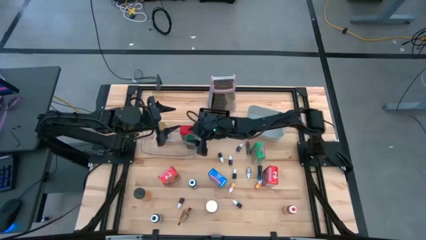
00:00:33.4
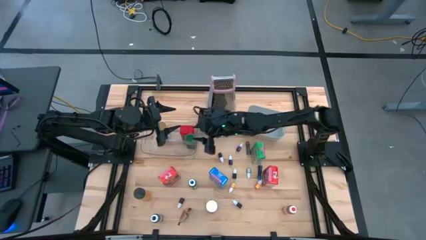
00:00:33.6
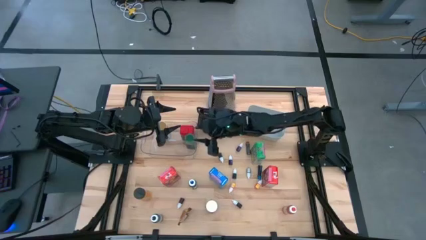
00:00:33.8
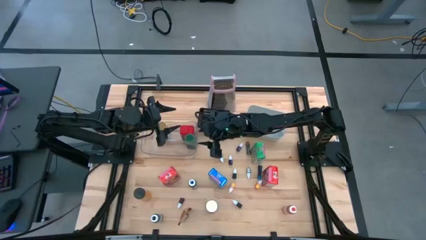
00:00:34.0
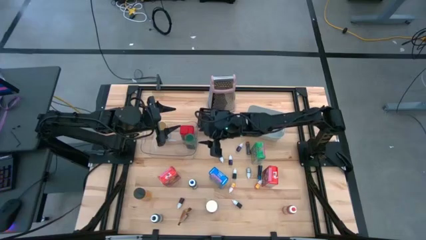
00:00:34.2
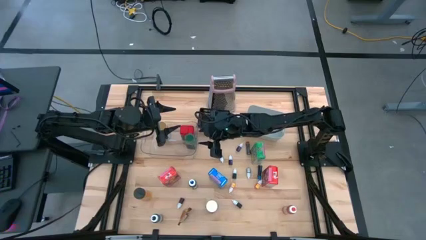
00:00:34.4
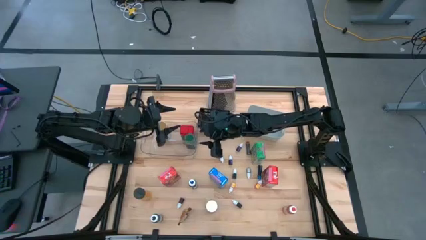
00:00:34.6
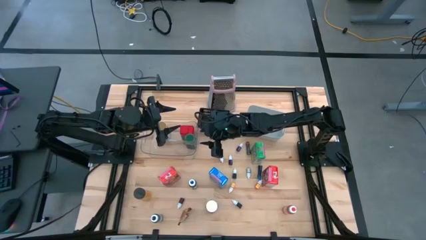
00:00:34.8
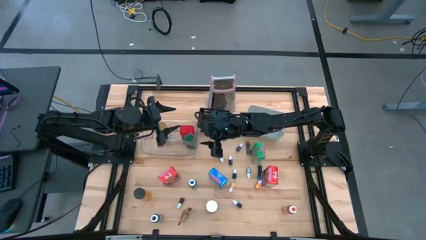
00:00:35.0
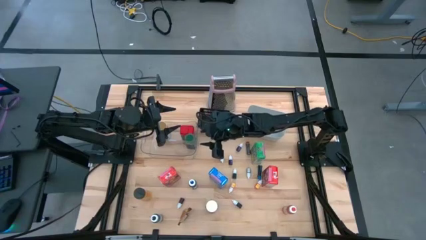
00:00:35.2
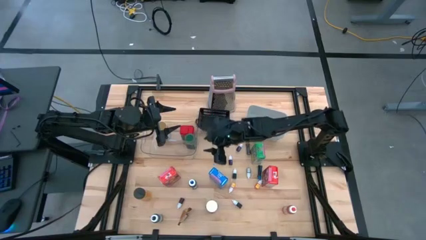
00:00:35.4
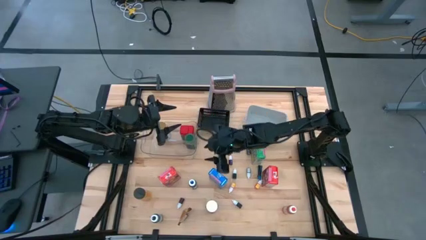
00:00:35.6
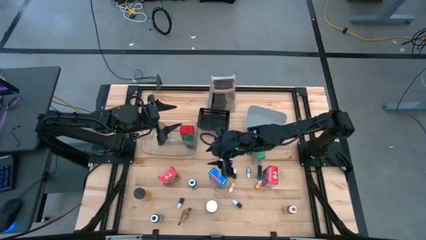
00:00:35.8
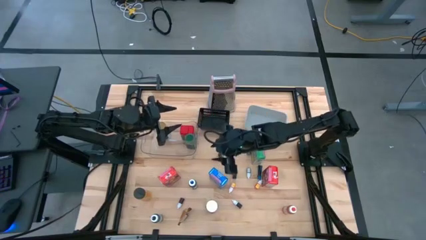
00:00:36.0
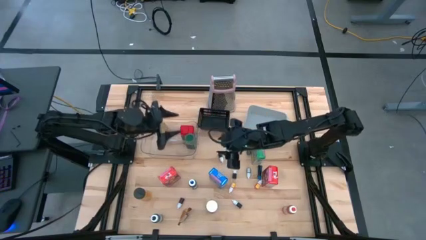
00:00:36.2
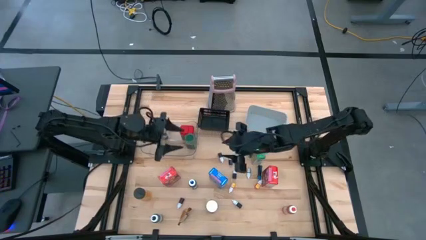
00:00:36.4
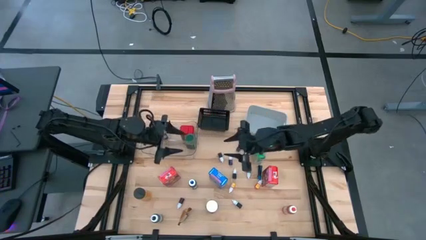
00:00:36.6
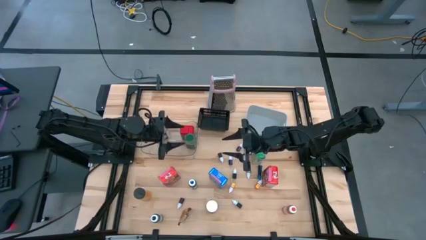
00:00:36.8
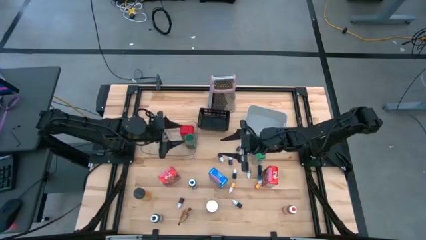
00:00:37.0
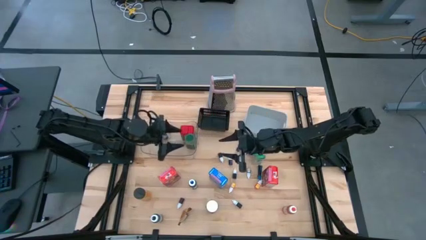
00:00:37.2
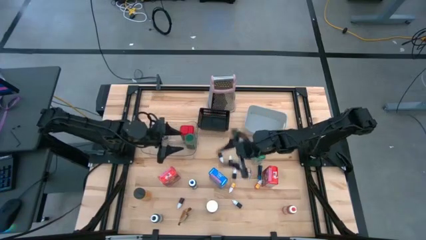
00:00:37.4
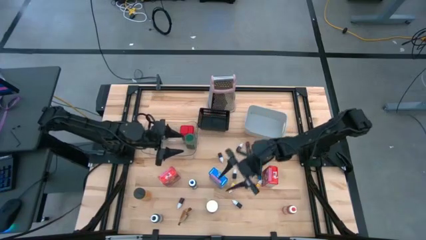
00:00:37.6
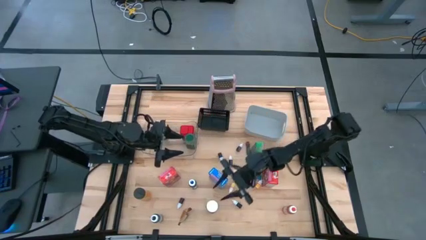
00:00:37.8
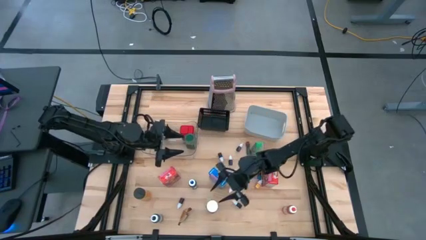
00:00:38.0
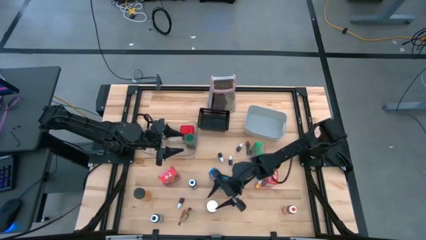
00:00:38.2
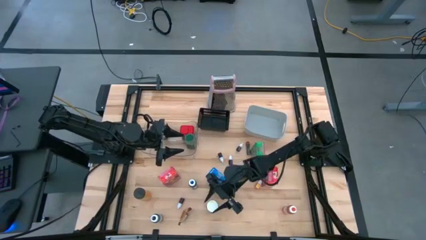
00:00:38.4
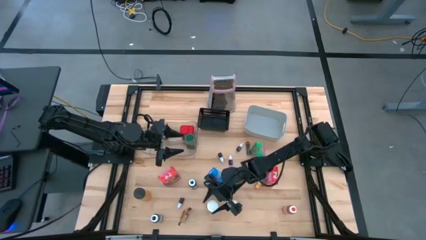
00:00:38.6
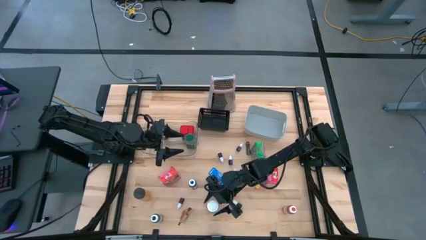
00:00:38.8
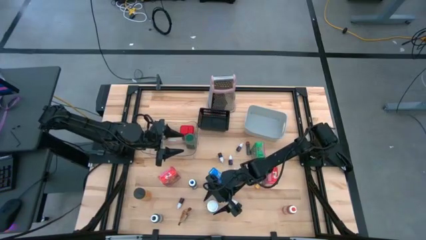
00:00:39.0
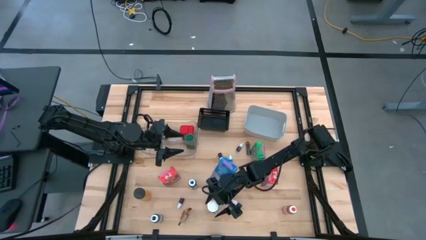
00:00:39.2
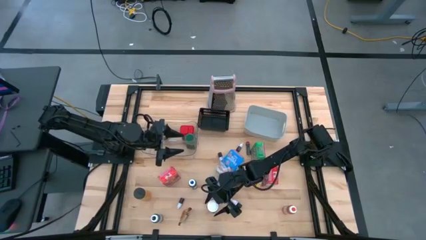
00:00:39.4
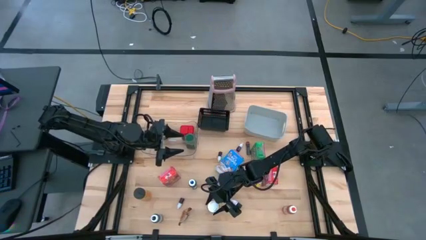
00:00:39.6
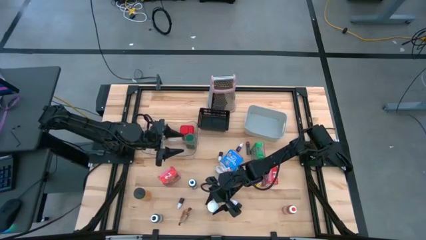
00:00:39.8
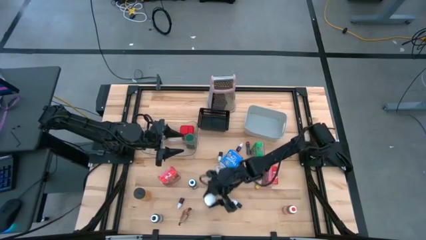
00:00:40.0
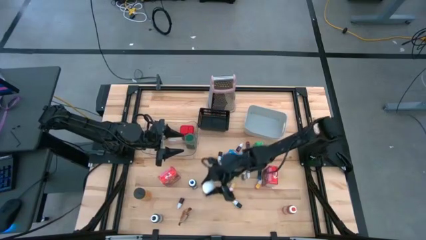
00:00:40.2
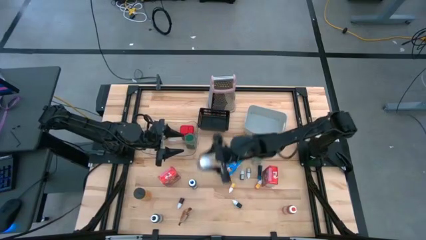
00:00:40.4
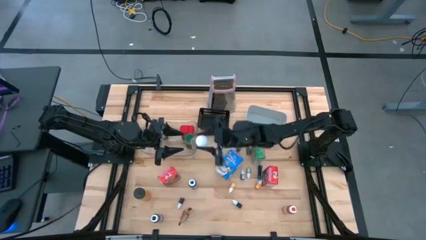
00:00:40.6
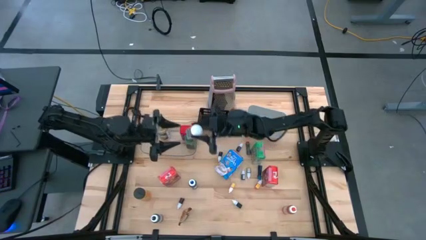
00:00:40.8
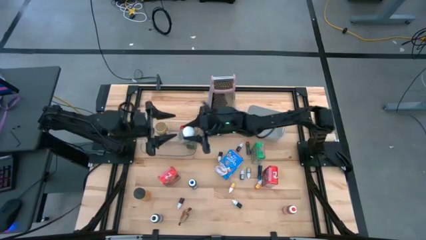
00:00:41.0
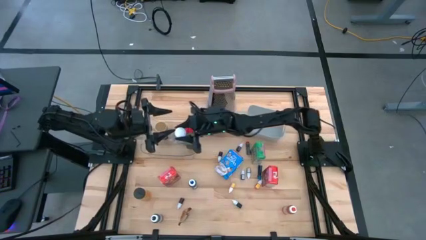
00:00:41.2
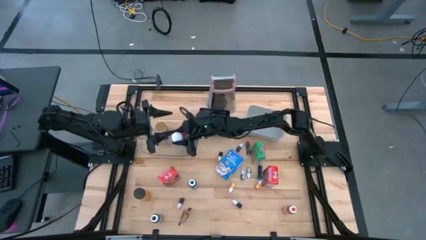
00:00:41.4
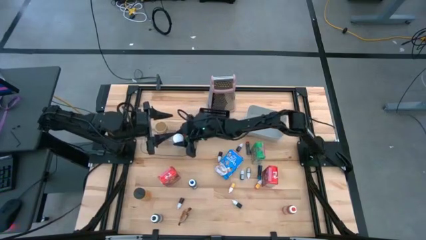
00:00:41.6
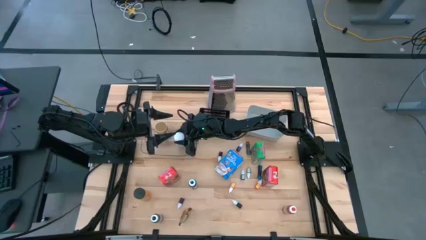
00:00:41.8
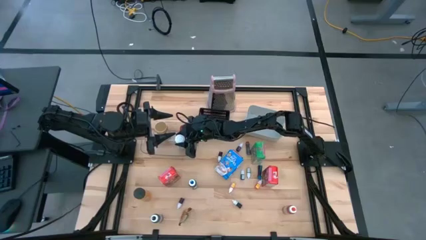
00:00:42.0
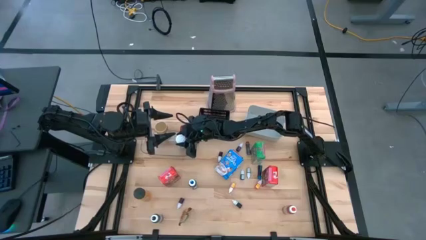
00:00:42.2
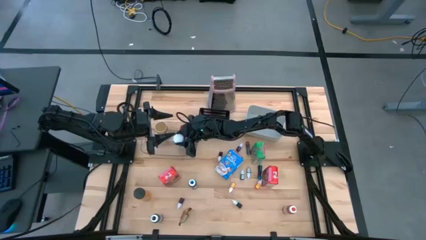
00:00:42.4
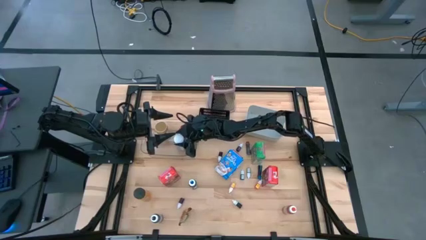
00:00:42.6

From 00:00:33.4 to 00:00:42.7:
Task: Pick & Place Kitchen Items
Put the white seasoning bottle into the transparent bin

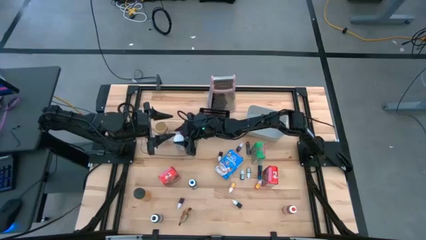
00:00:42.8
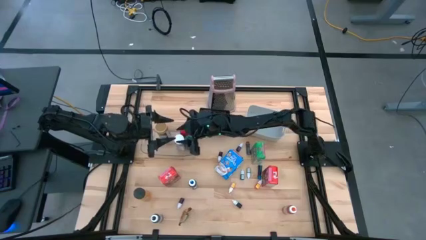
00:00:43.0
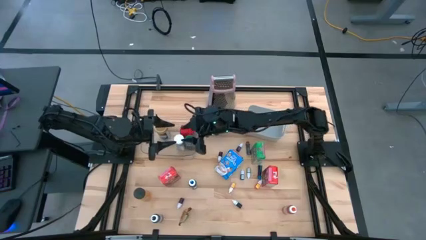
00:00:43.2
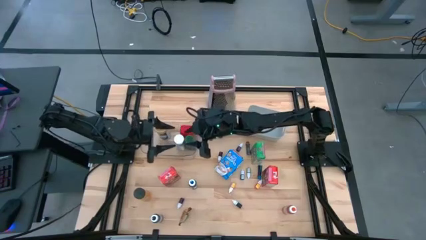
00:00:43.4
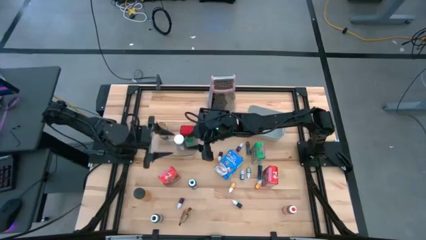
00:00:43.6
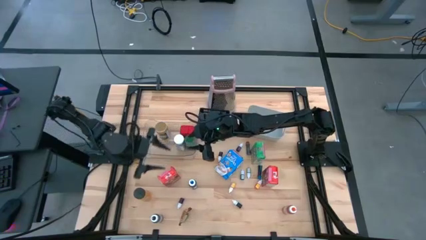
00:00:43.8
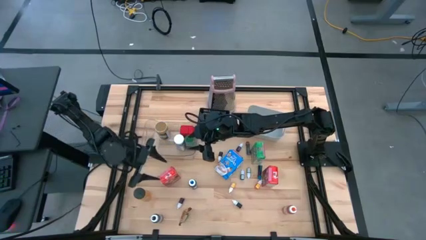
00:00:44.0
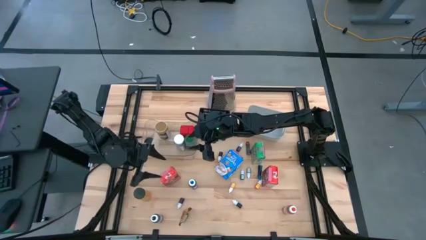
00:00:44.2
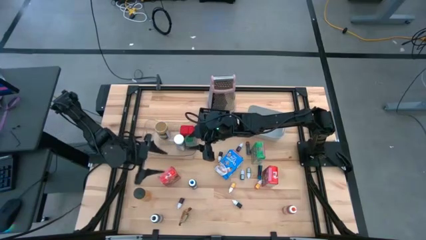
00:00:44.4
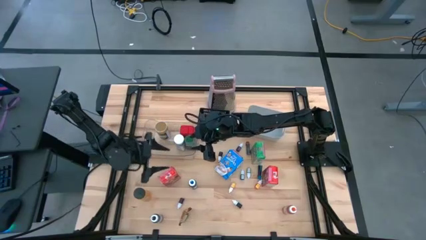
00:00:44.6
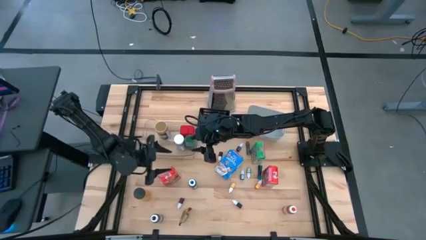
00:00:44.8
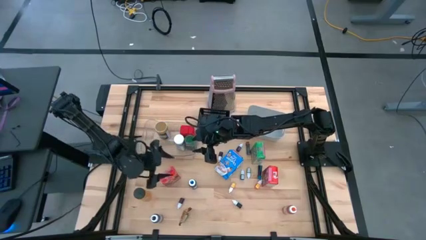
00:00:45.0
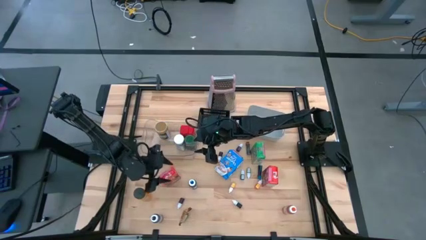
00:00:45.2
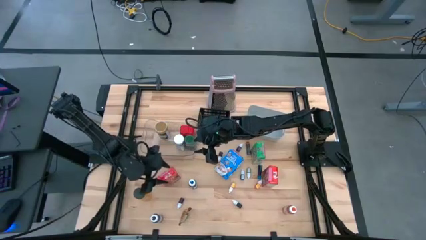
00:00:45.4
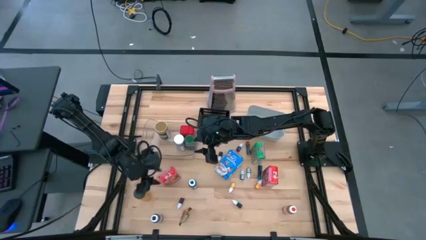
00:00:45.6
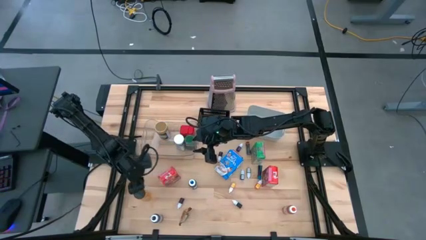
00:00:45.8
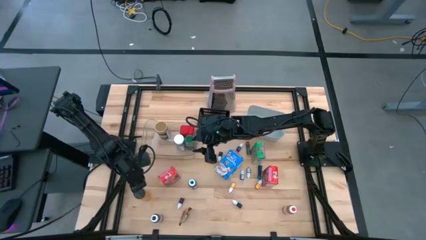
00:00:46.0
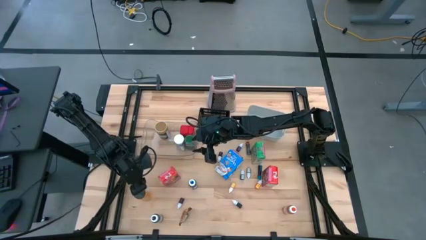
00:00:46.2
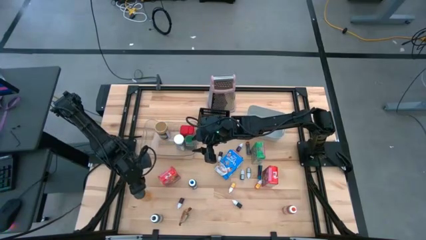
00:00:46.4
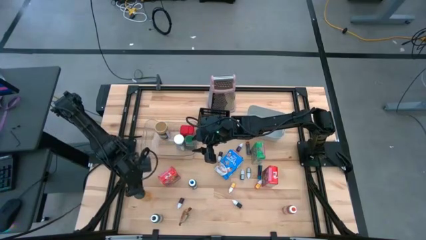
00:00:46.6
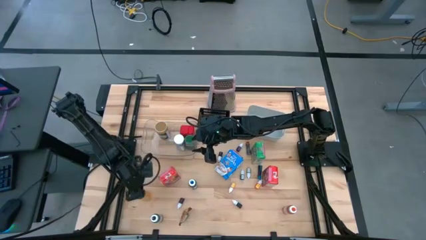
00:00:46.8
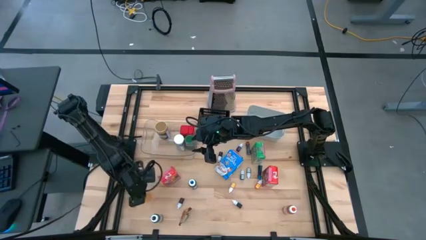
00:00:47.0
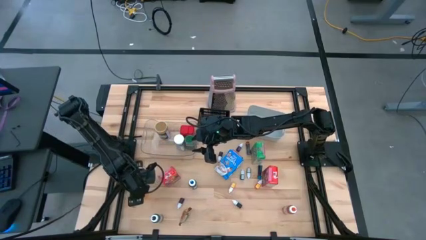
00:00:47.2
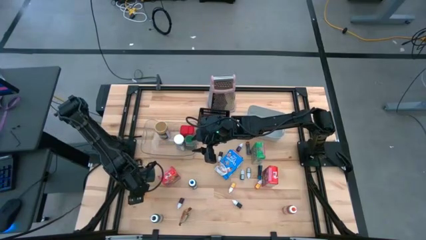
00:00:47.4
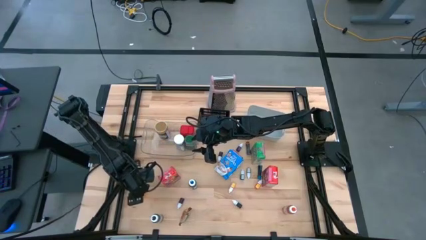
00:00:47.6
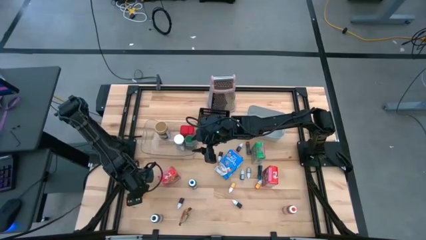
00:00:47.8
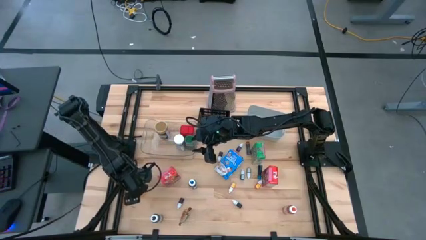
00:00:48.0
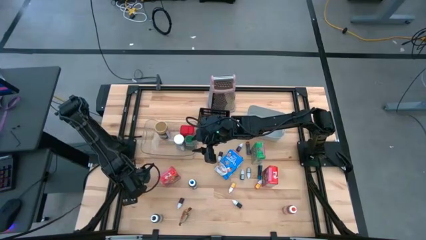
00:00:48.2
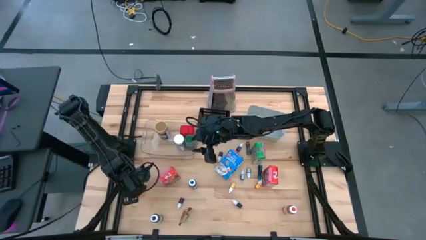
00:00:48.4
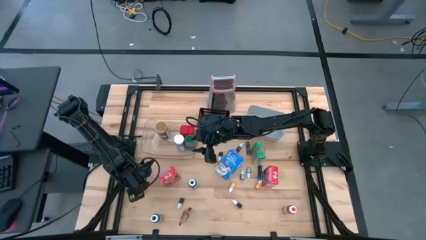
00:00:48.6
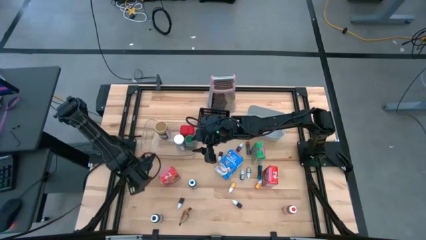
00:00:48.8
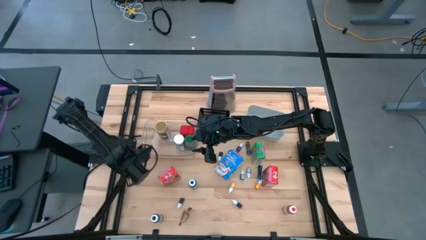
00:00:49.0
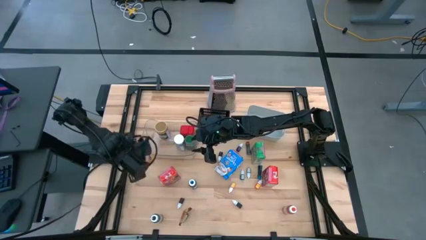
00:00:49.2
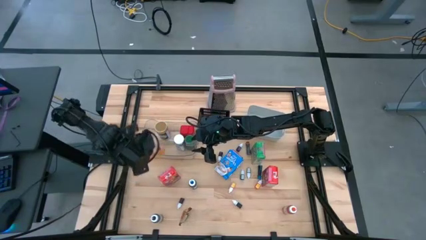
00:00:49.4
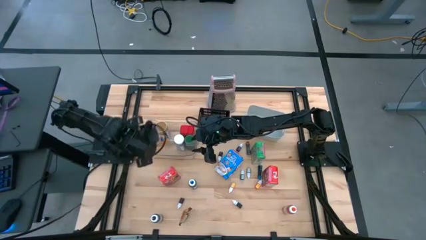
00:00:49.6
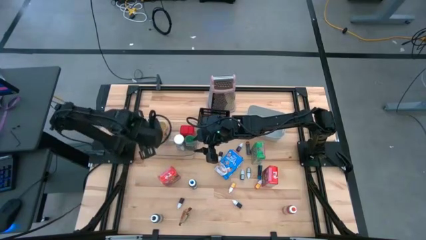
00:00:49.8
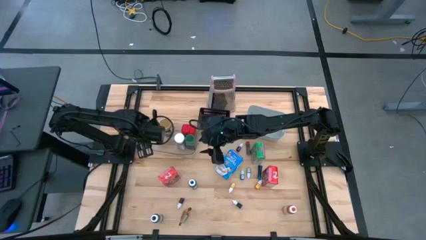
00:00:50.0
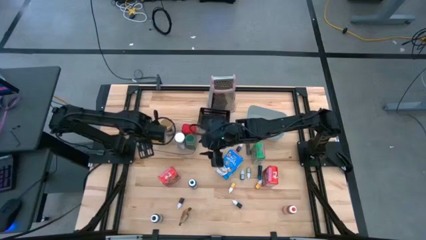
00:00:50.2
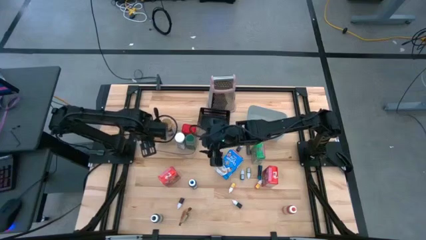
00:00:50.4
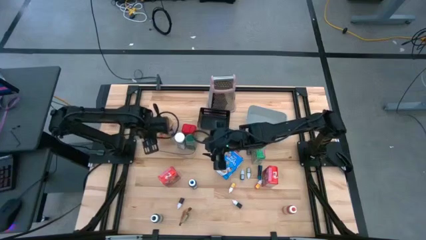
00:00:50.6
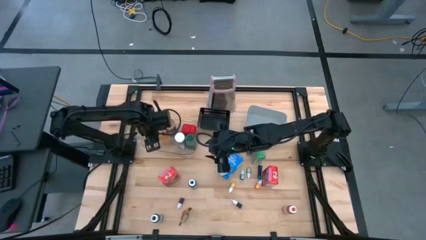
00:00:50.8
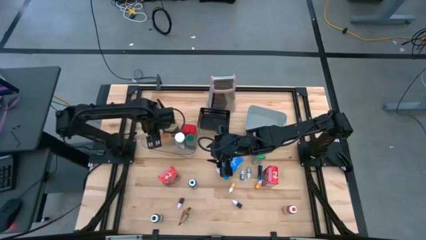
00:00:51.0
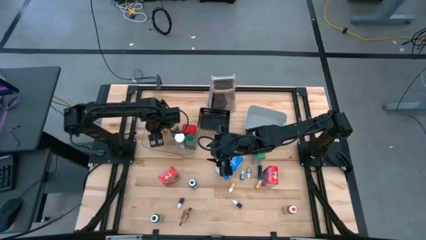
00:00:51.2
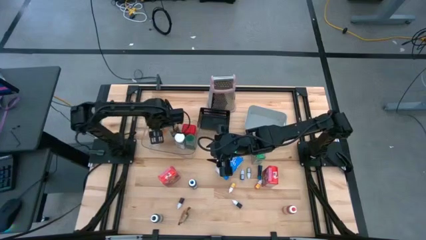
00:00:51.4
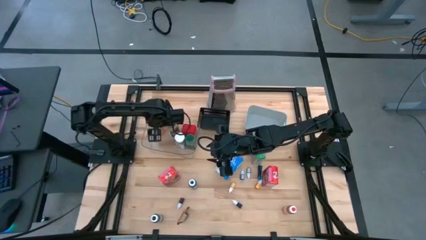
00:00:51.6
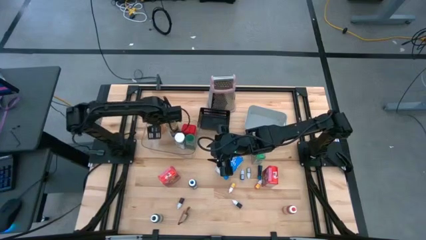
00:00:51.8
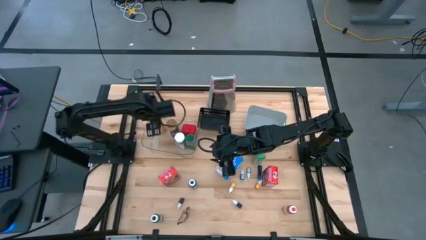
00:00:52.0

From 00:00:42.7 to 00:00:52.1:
Put the black seasoning bottle into the transparent bin
